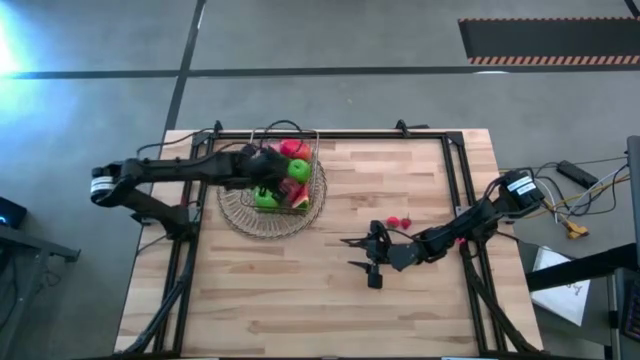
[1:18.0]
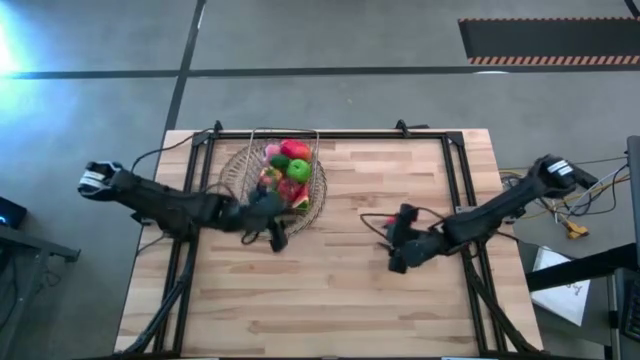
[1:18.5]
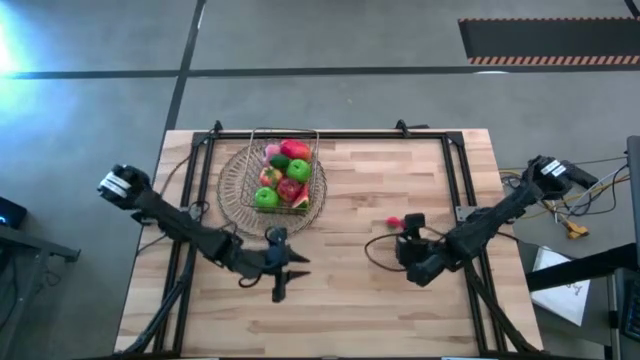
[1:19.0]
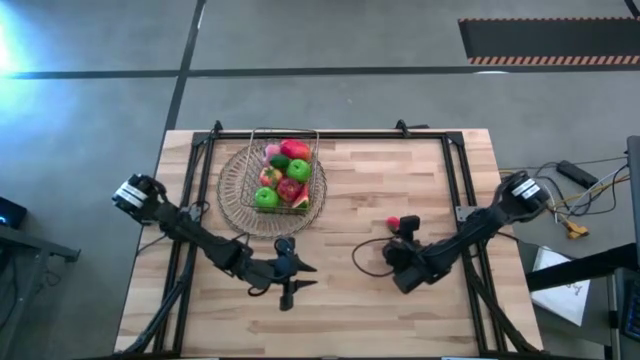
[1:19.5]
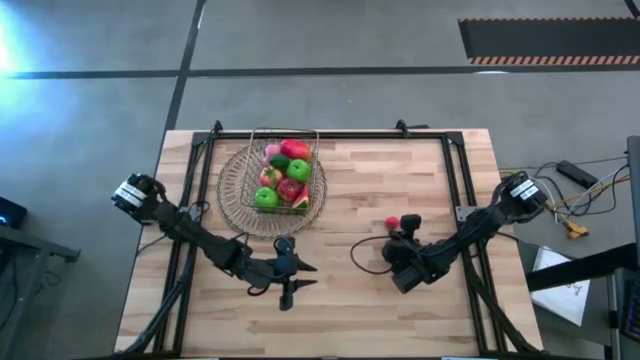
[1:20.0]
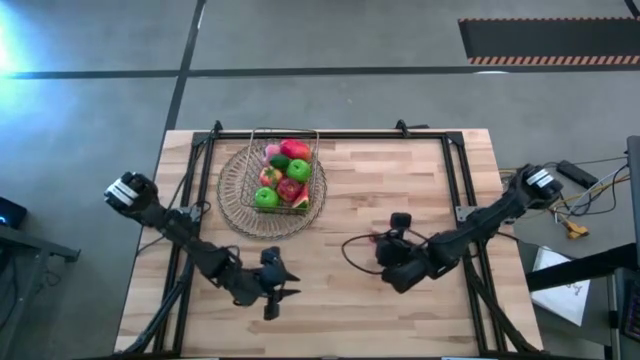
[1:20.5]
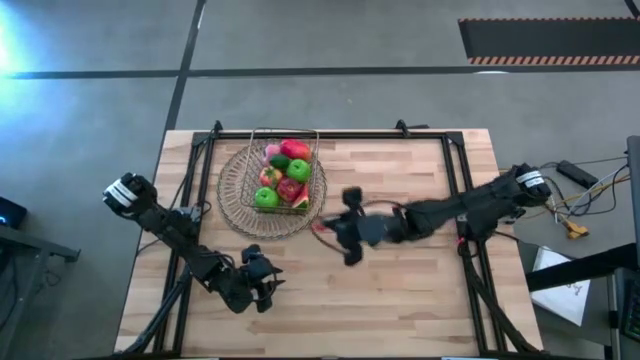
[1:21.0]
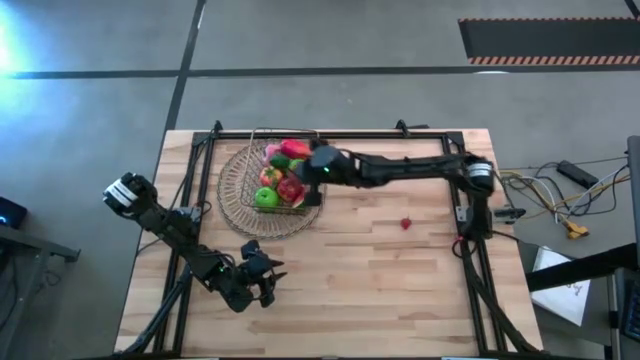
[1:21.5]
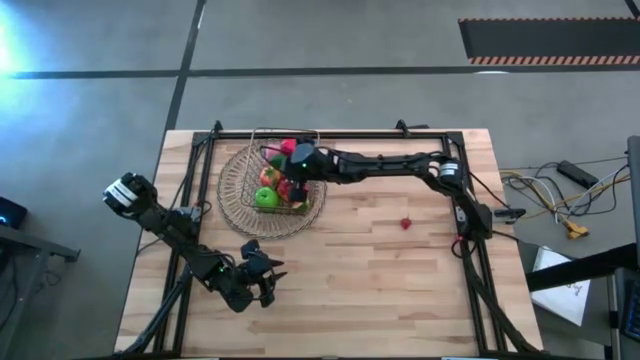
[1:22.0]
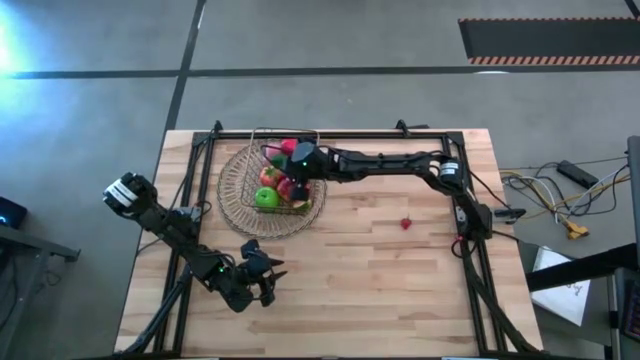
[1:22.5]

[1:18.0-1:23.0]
Task: Build produce basket
Put the left strawberry into the basket

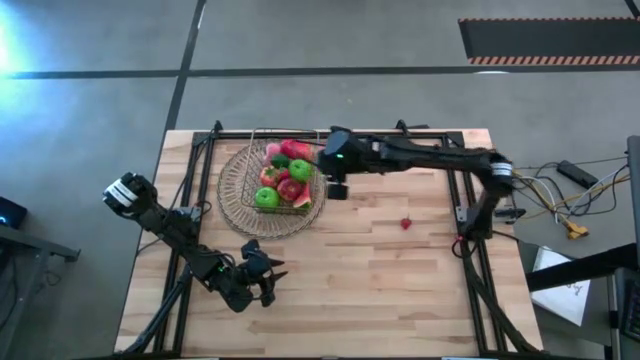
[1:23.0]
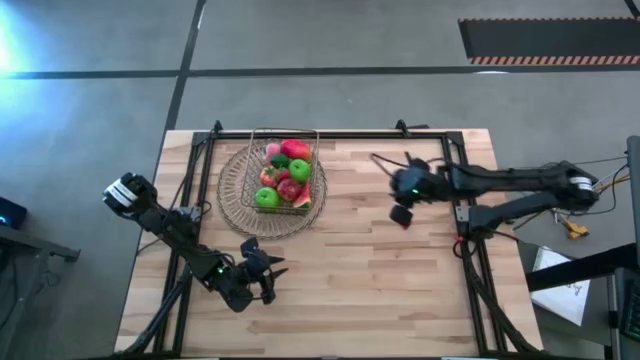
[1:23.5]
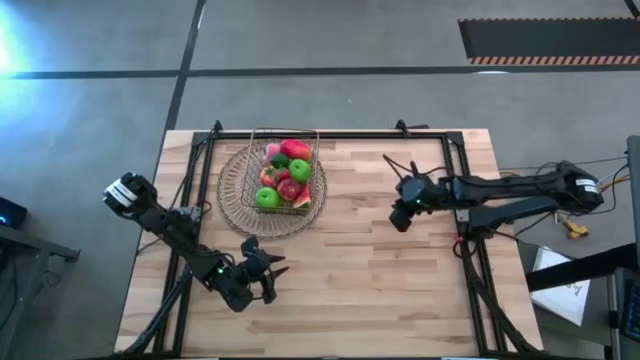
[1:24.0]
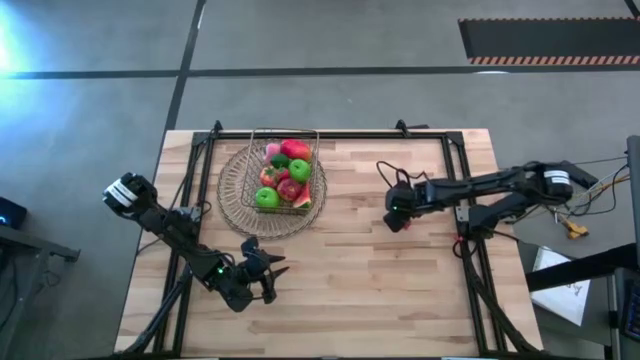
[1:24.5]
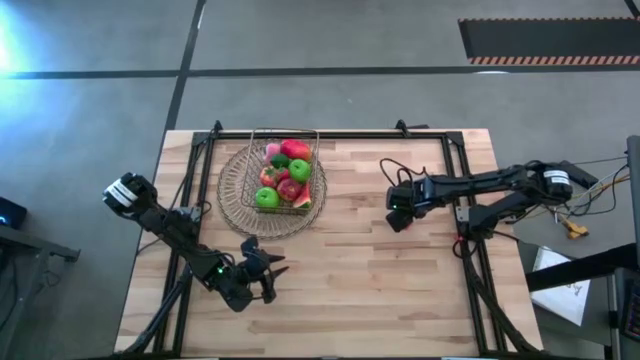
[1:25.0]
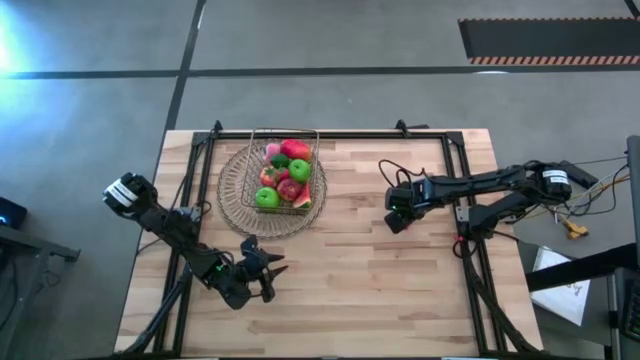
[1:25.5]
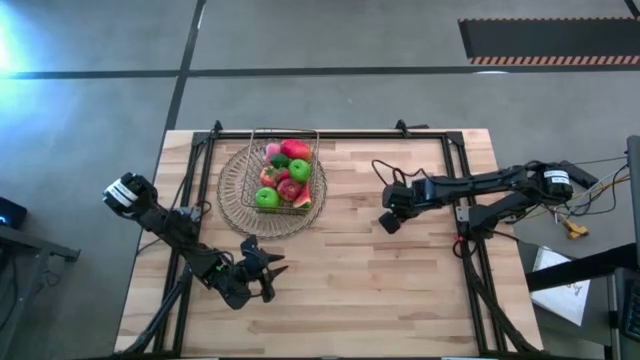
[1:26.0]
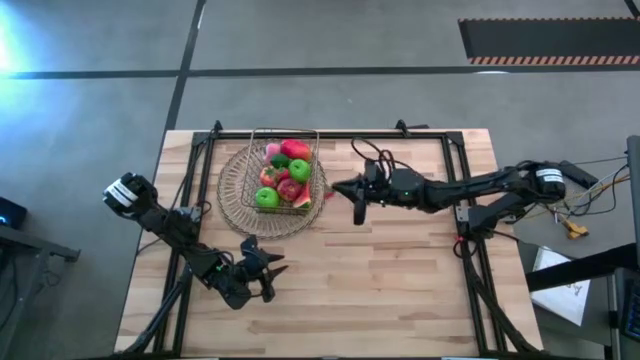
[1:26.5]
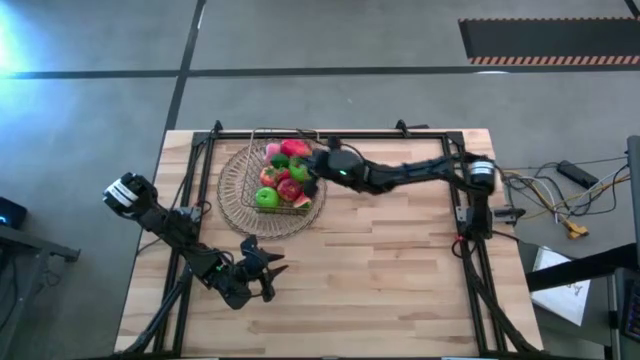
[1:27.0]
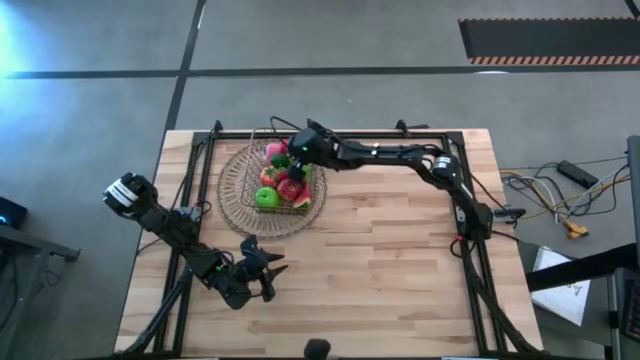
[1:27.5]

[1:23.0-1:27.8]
Put the strawberry into the basket

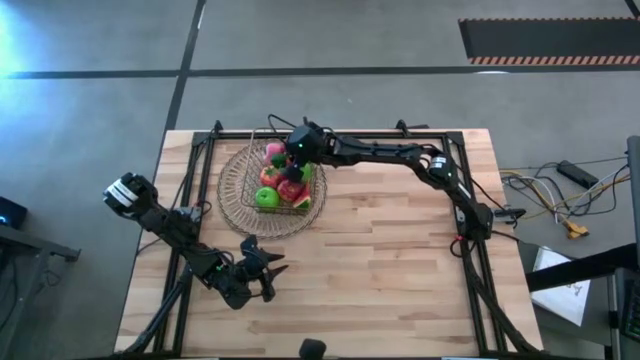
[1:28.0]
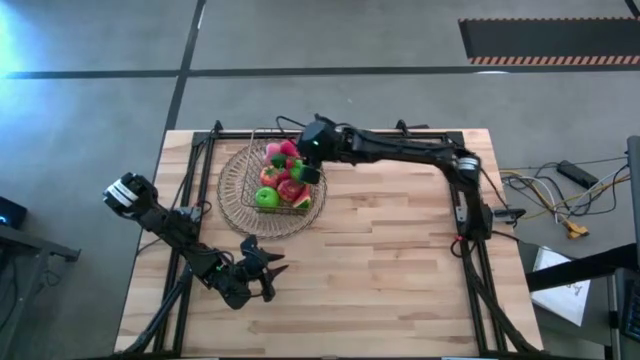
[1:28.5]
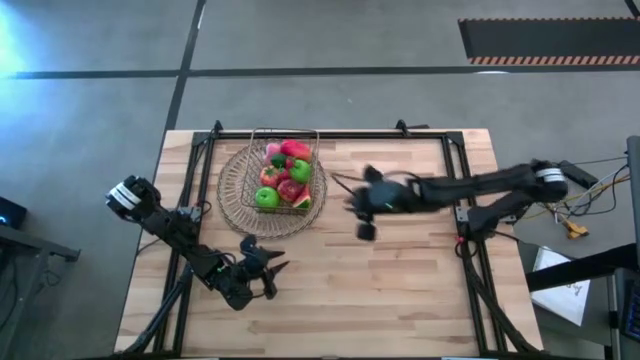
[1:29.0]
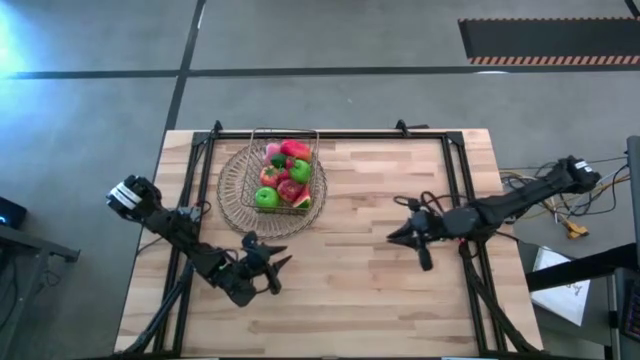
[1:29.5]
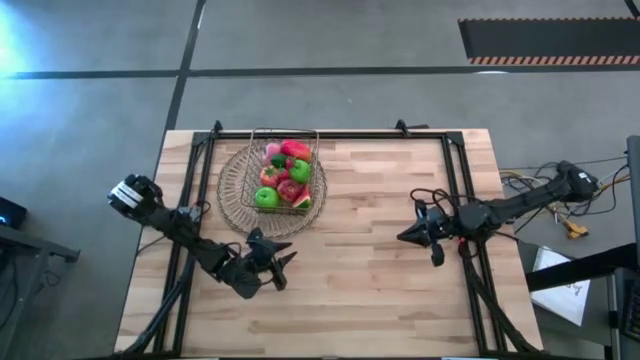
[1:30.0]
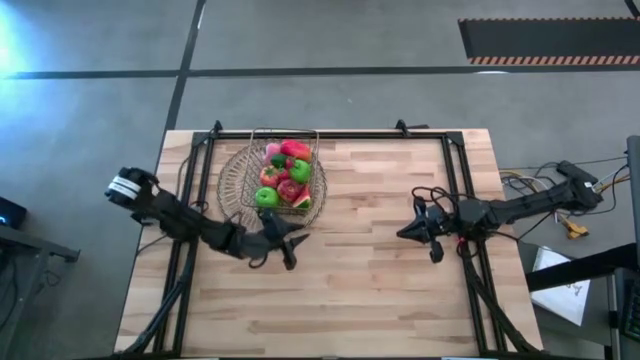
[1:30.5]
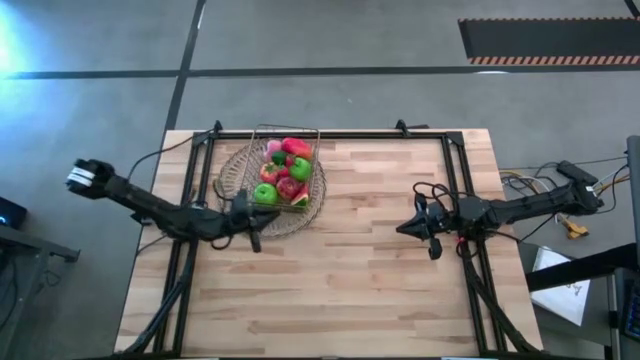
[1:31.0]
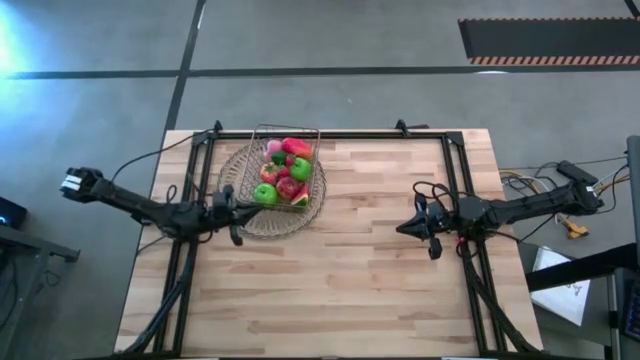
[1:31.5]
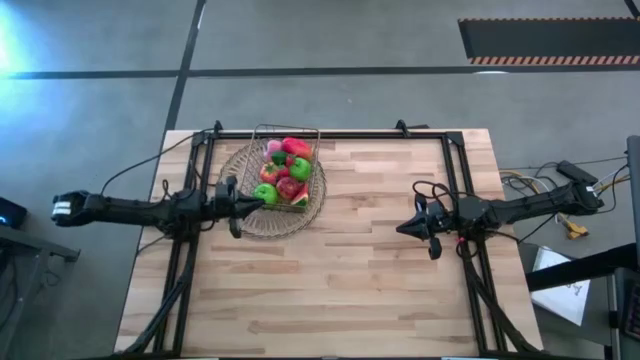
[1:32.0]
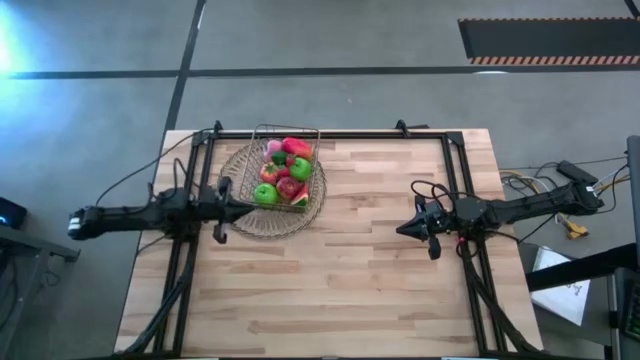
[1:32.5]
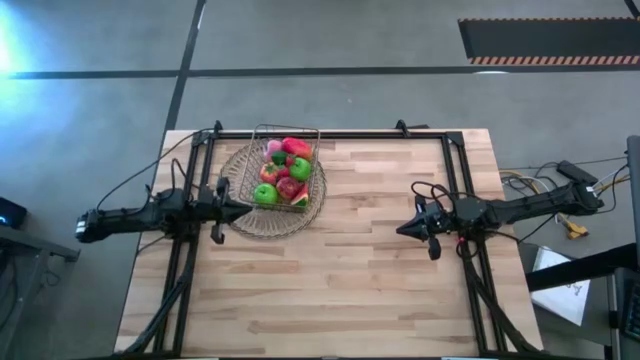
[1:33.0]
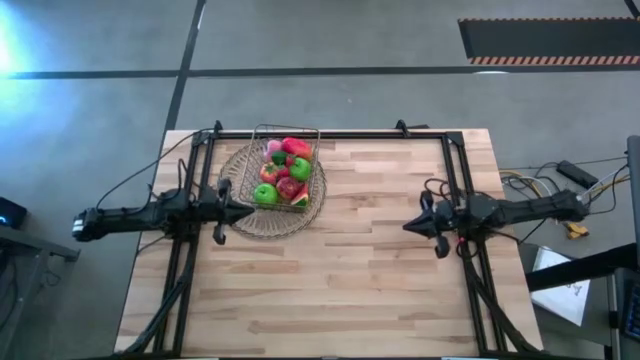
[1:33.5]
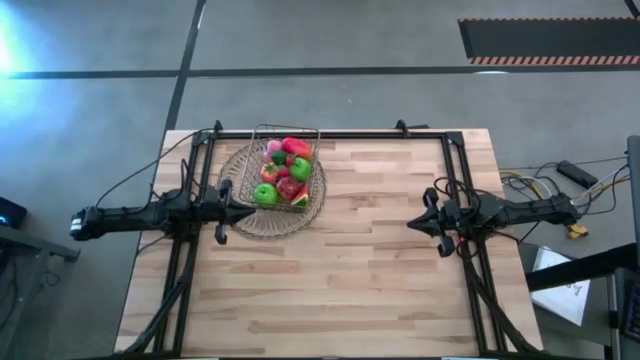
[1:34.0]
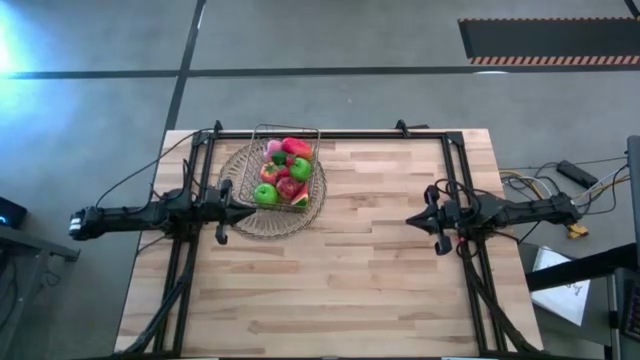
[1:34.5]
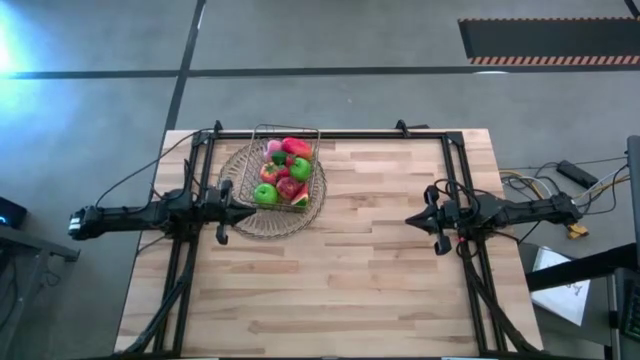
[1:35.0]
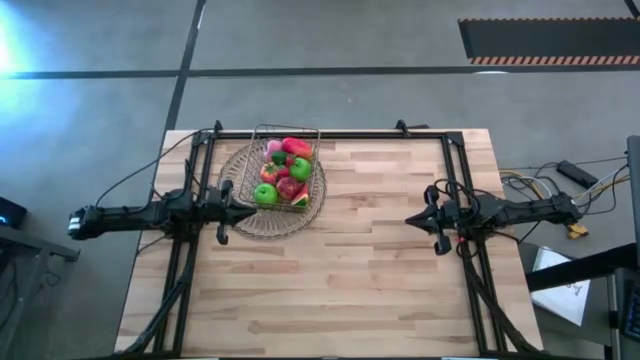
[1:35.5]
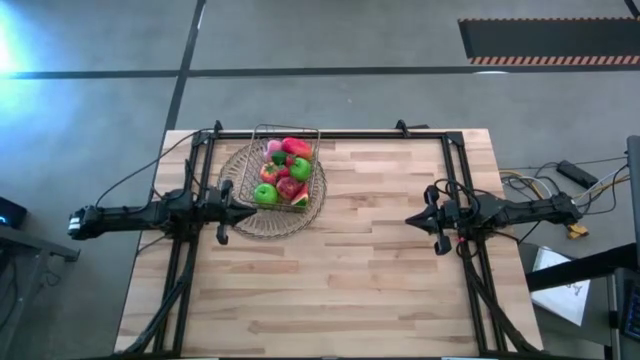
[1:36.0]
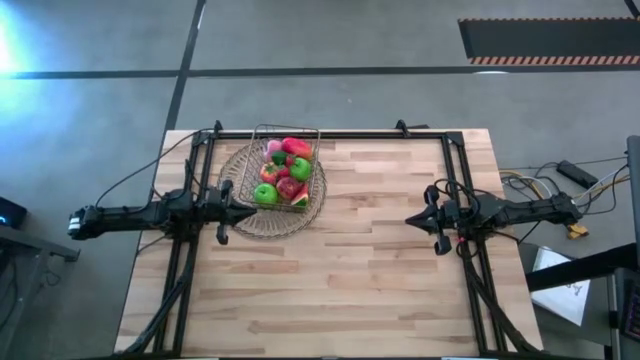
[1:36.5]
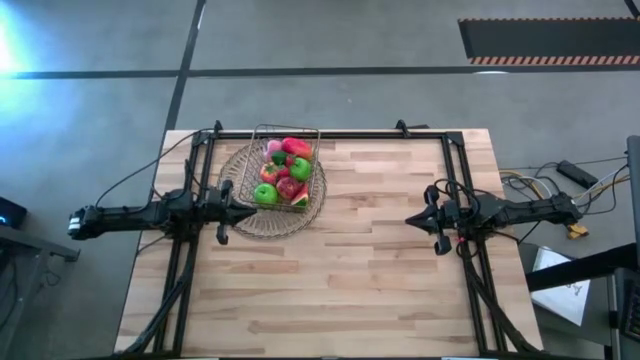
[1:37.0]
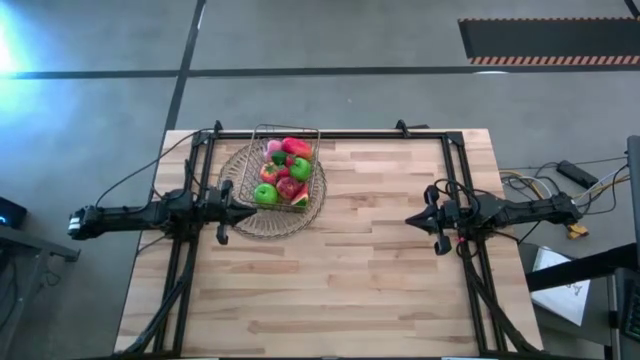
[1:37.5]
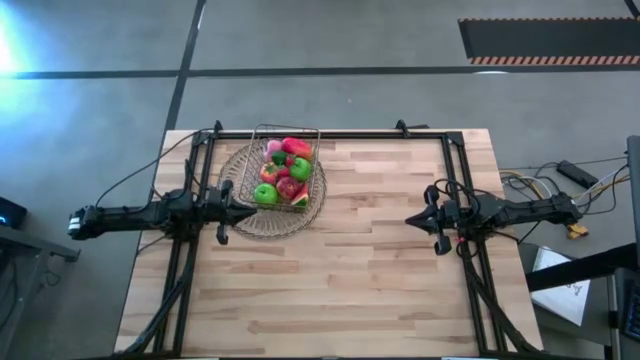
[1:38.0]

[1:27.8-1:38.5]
Return to Home Position
